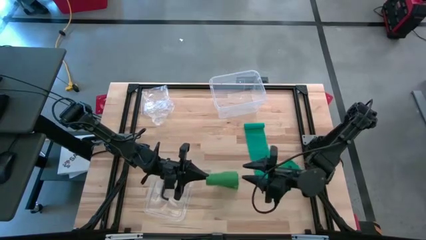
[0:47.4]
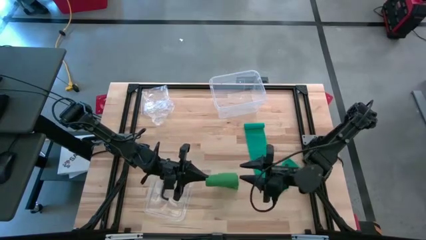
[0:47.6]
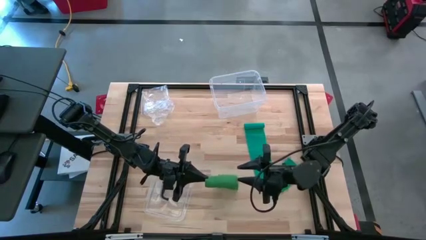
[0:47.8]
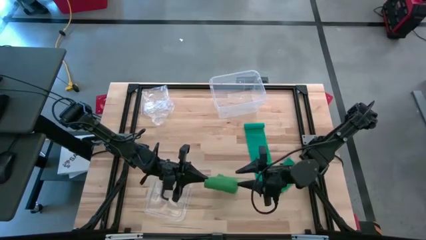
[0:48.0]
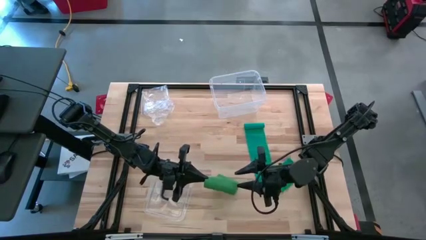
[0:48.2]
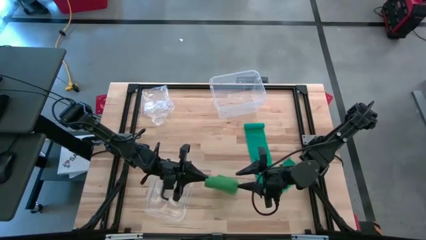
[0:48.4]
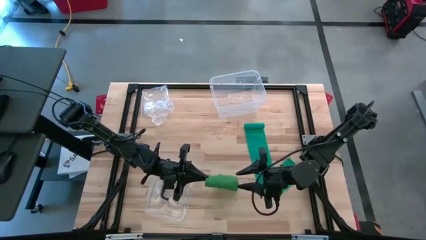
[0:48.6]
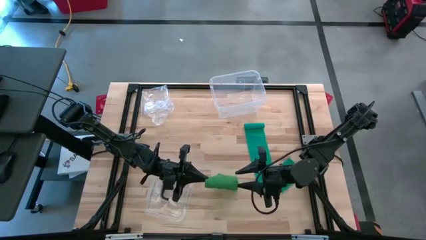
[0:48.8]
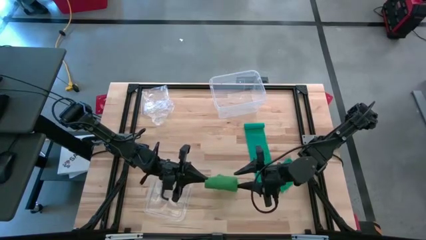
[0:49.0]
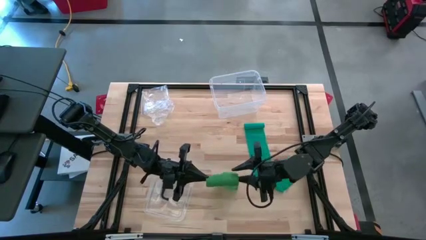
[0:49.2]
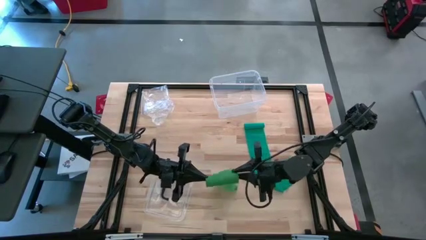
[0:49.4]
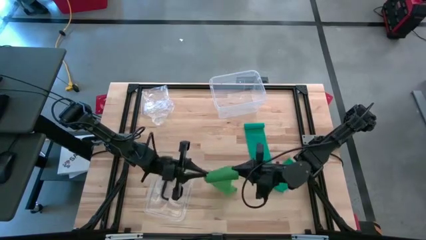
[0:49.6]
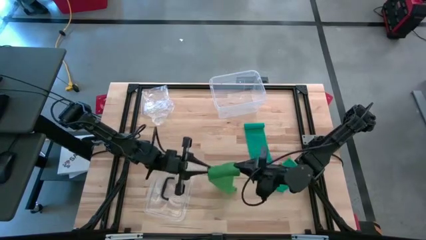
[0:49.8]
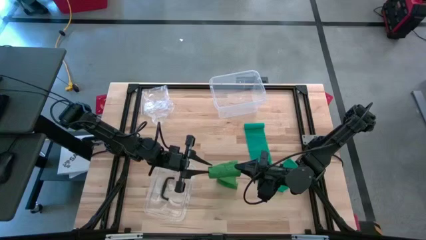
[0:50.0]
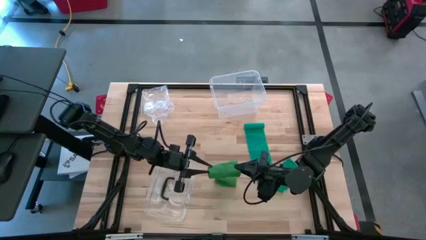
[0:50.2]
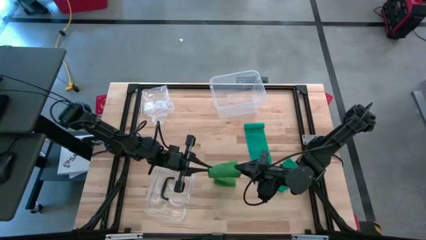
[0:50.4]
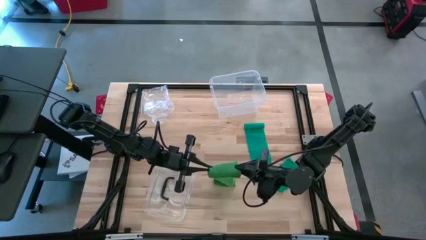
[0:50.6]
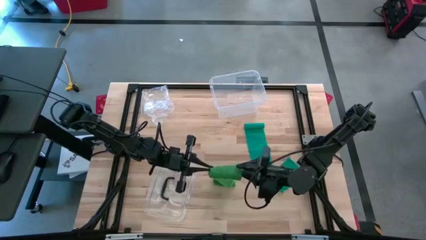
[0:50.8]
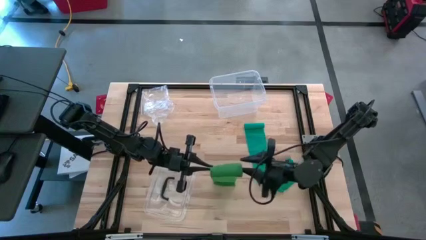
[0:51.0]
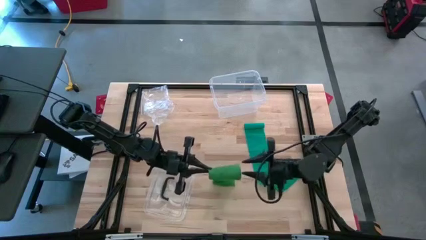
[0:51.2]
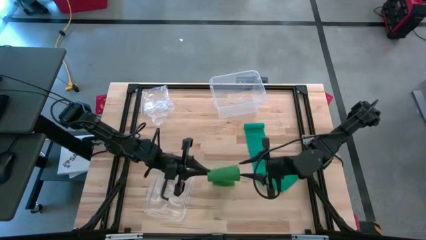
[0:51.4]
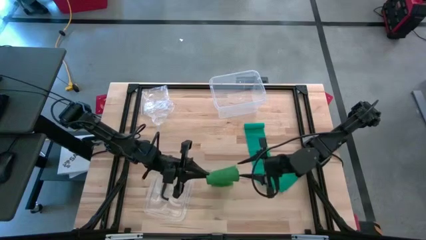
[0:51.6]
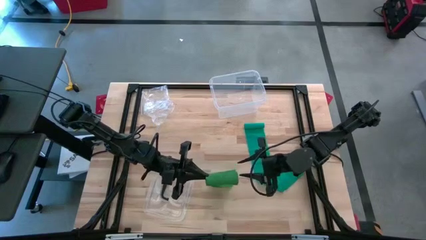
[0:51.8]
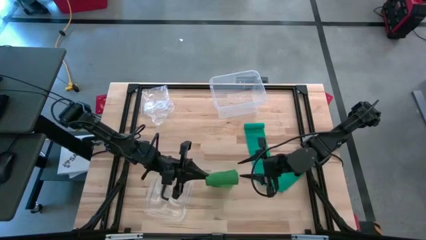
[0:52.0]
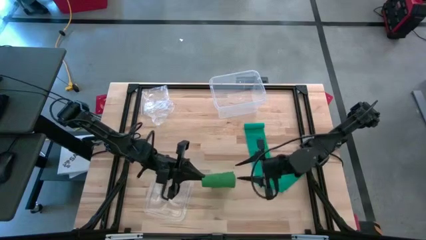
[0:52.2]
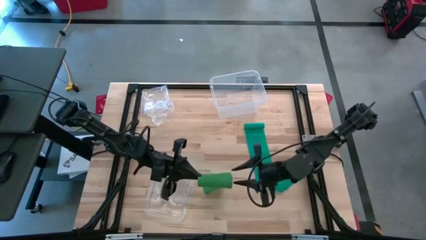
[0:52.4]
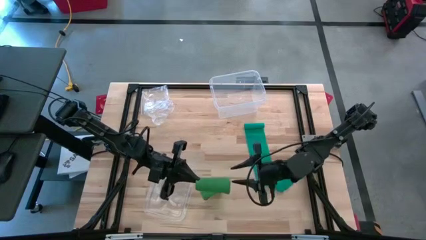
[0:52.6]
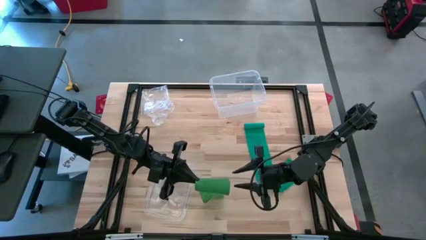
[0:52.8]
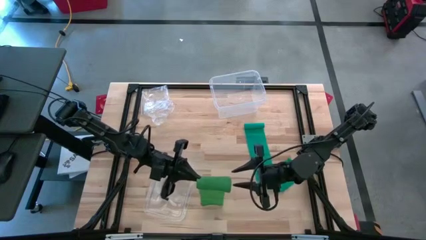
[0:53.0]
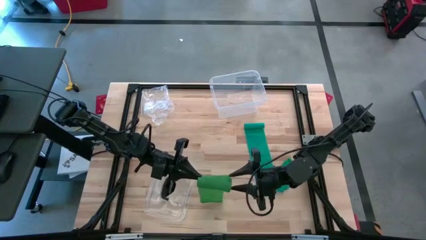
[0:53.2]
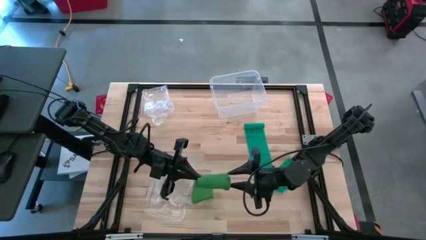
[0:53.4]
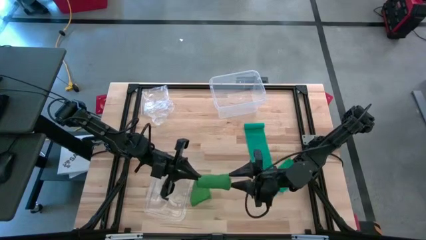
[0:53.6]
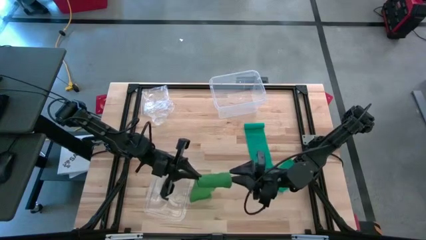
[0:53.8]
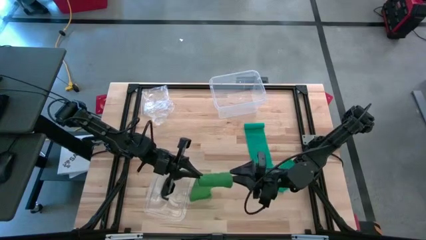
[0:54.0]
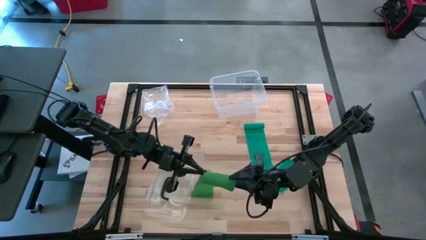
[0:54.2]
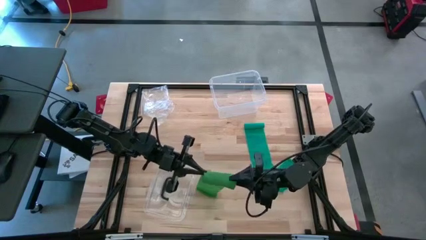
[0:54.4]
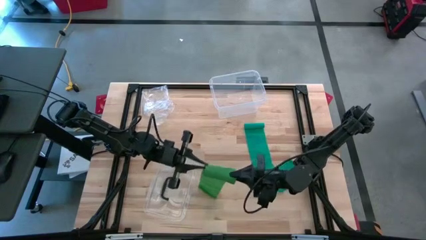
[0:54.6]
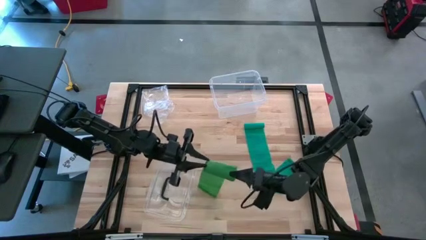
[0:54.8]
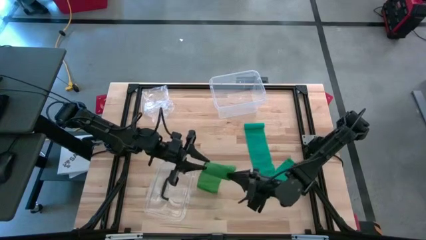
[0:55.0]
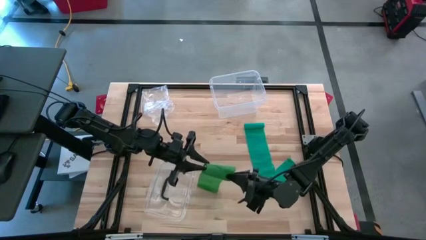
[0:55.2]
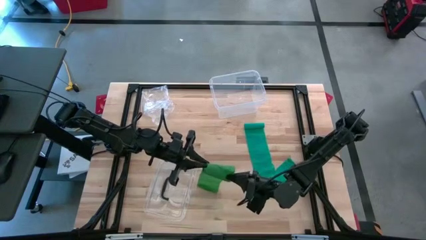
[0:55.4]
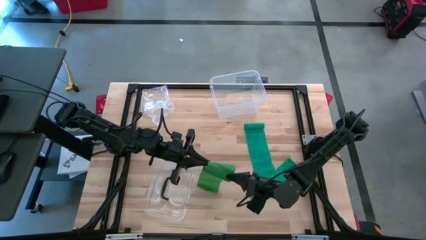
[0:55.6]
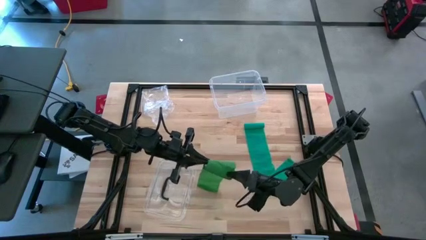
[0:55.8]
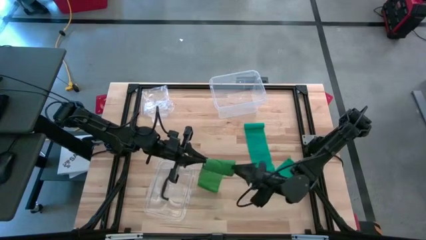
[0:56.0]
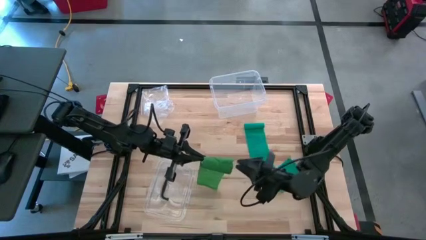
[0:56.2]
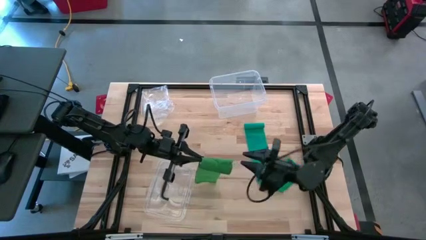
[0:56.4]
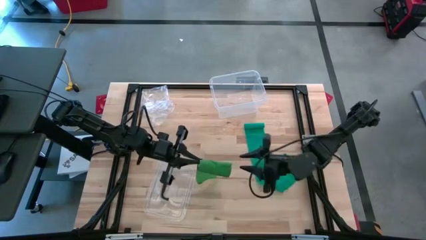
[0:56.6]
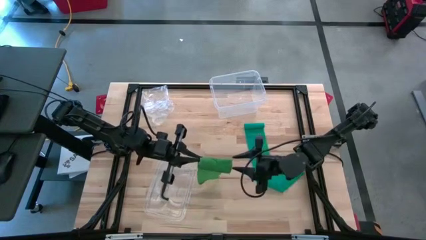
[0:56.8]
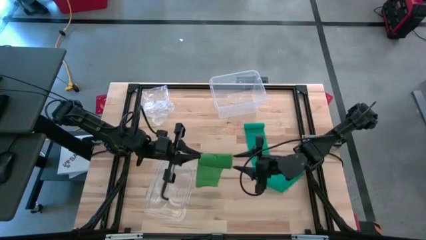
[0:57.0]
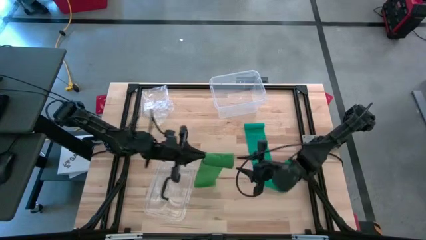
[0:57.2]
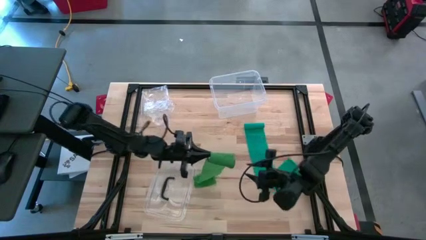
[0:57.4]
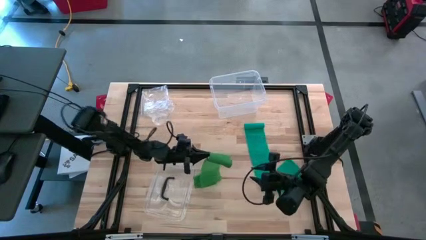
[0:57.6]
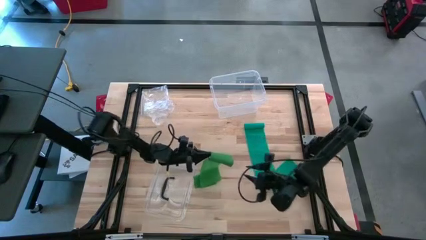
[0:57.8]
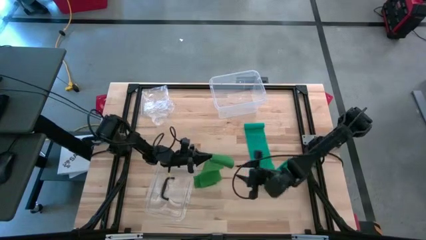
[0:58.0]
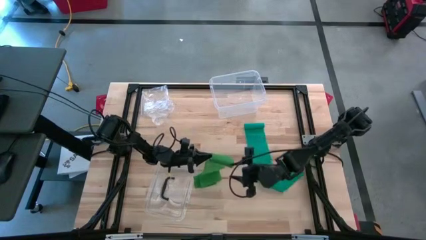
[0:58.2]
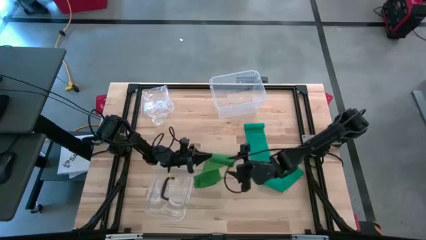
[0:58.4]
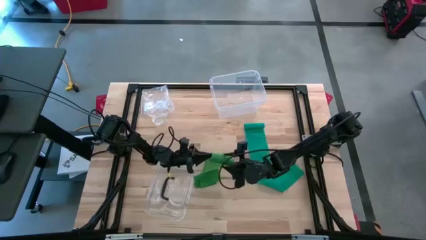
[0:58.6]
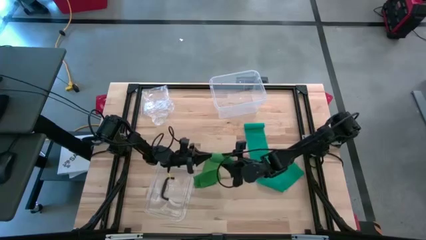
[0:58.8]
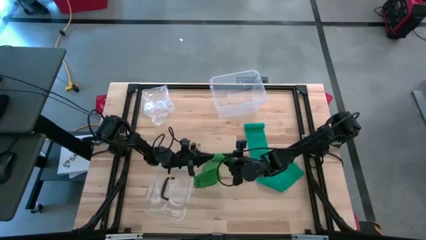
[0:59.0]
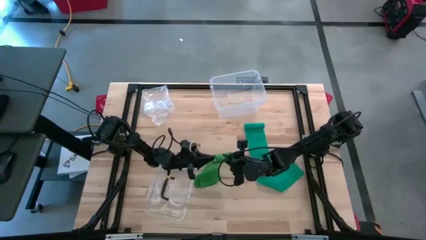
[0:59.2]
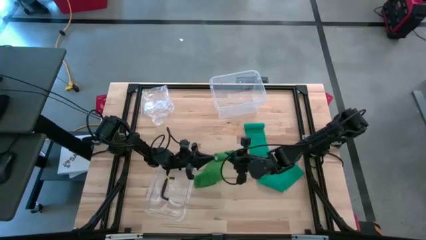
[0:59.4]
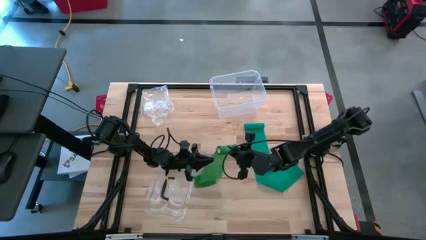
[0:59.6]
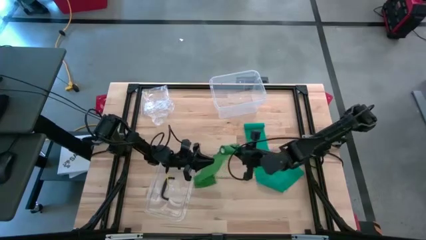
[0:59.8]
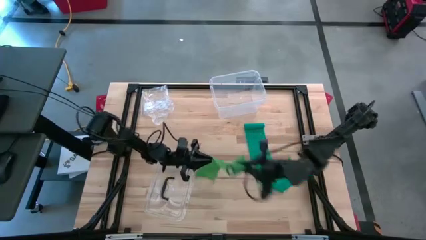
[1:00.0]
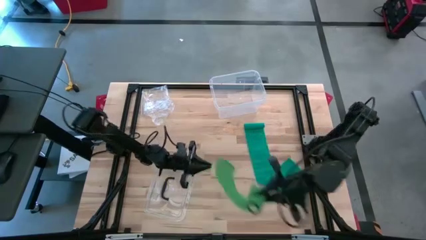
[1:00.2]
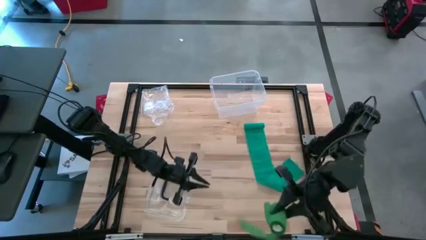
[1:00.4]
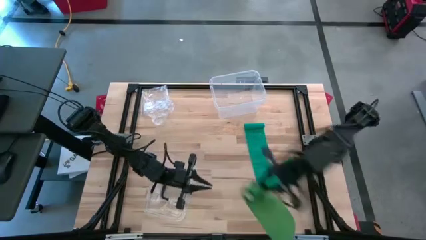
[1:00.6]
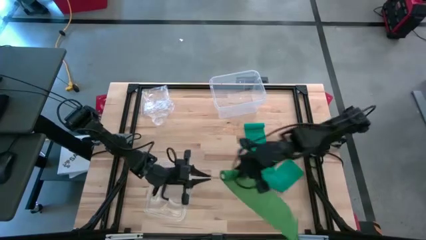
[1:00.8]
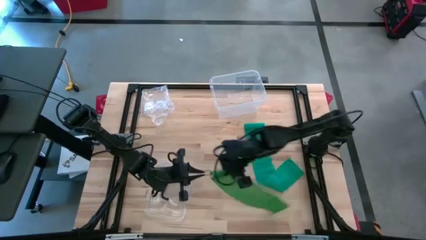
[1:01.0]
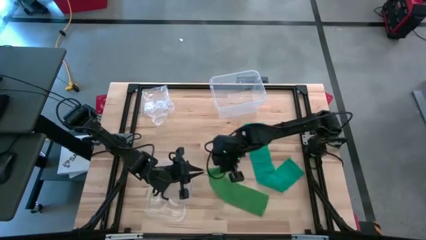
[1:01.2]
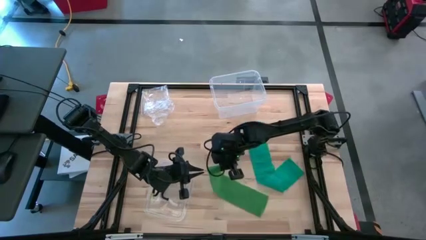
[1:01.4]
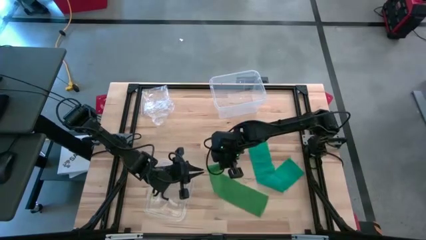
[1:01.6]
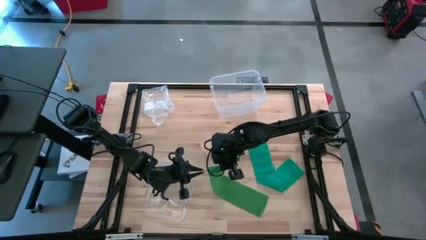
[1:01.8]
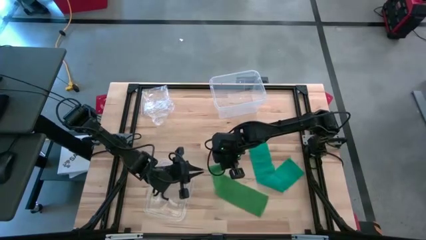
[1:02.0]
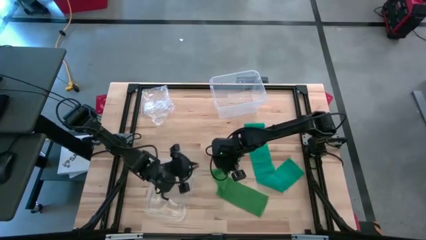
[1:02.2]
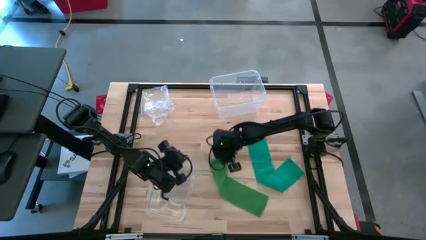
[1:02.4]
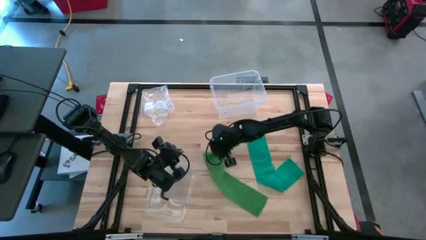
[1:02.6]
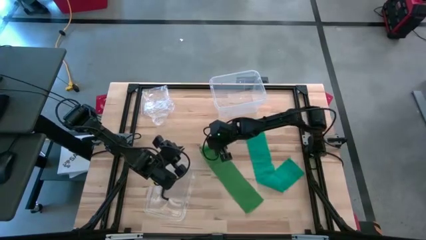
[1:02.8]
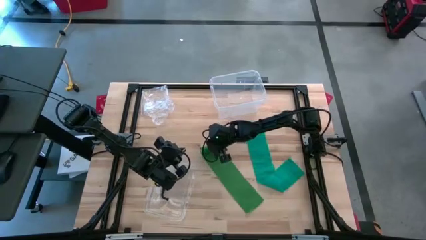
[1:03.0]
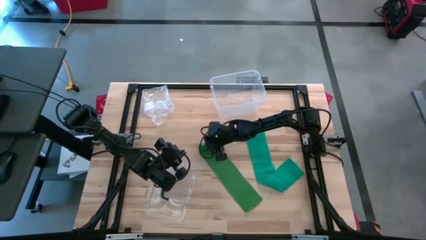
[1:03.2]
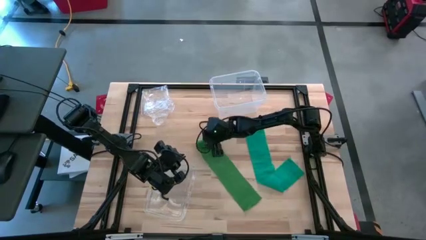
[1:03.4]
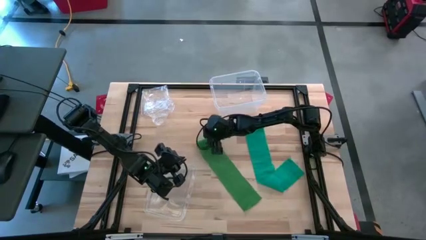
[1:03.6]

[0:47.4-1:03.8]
Task: Roll bandage
Roll the green bandage
